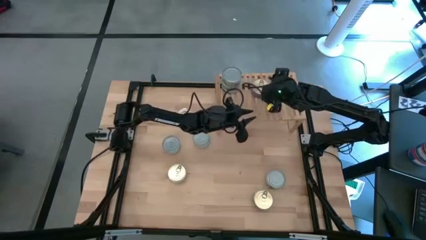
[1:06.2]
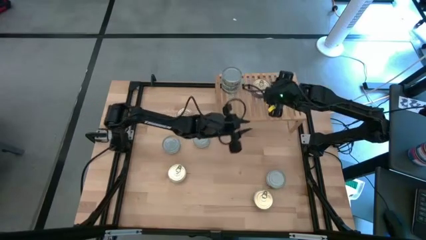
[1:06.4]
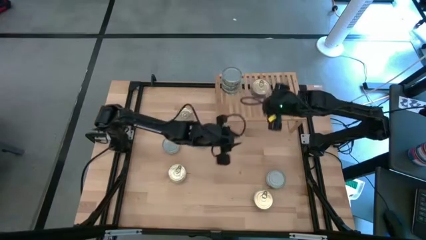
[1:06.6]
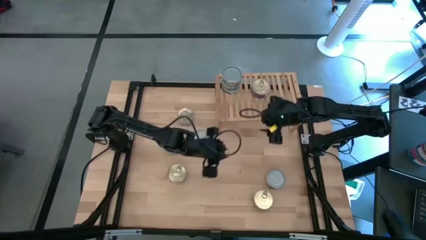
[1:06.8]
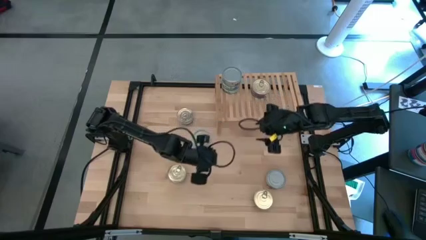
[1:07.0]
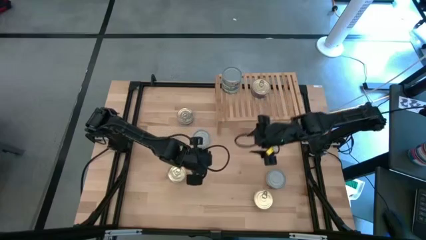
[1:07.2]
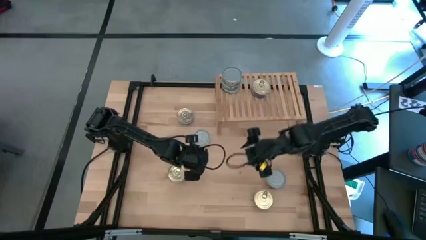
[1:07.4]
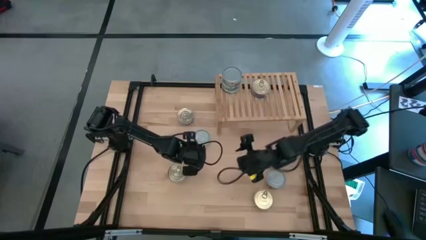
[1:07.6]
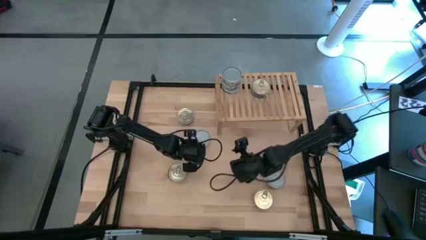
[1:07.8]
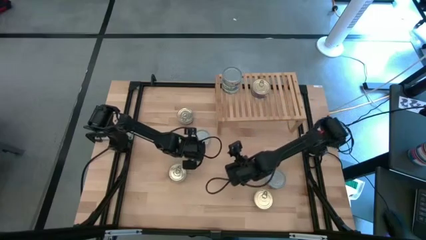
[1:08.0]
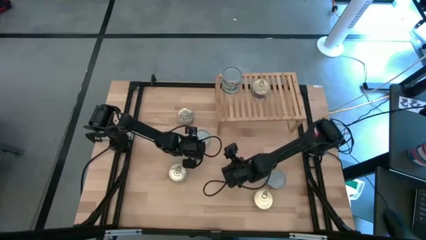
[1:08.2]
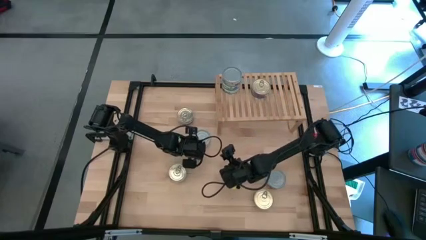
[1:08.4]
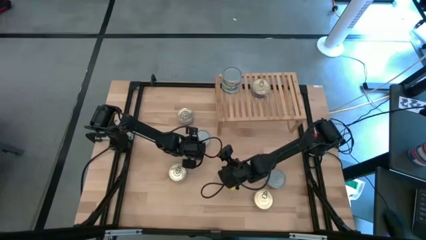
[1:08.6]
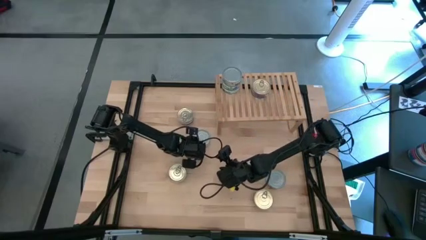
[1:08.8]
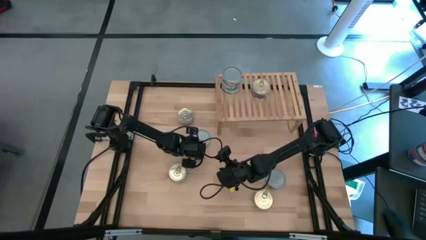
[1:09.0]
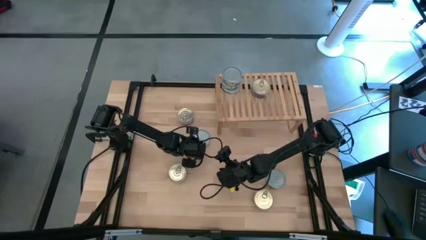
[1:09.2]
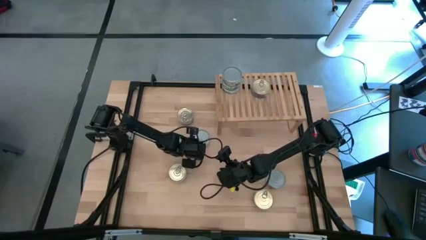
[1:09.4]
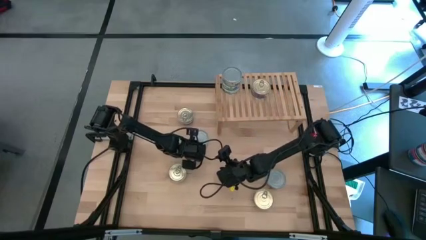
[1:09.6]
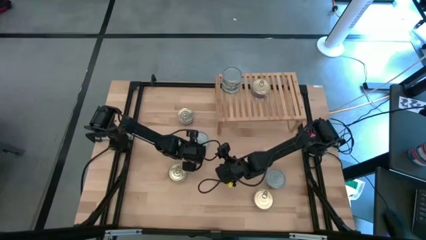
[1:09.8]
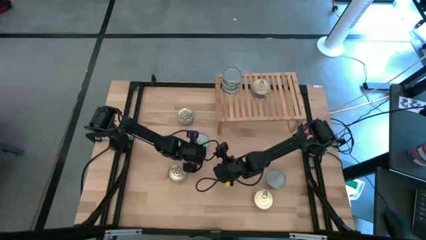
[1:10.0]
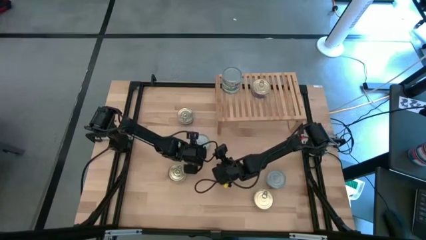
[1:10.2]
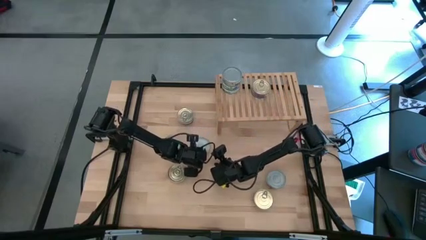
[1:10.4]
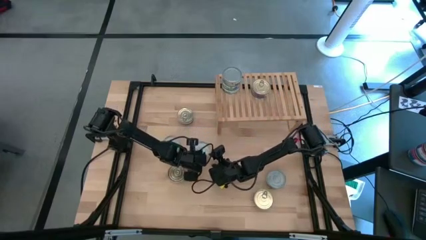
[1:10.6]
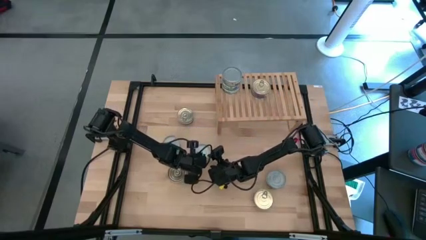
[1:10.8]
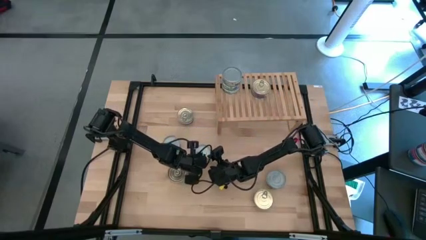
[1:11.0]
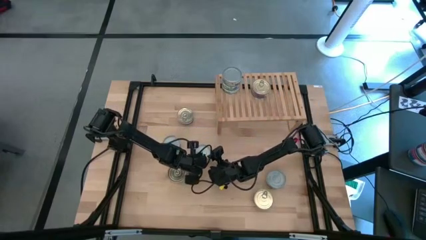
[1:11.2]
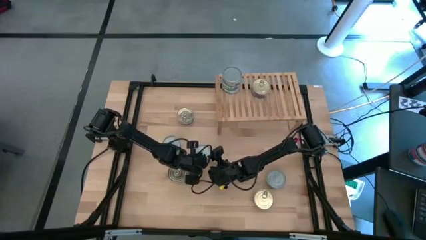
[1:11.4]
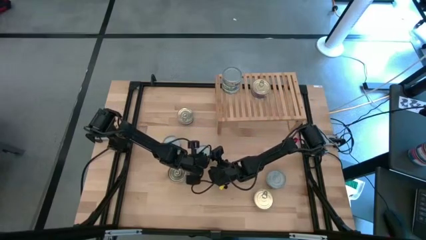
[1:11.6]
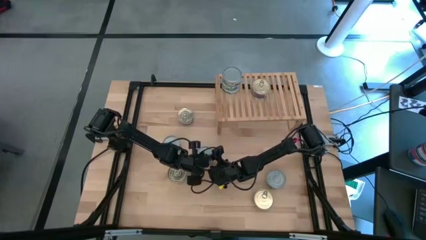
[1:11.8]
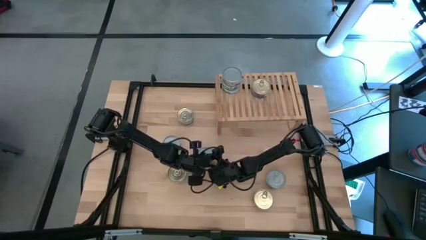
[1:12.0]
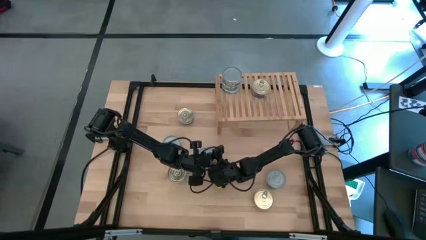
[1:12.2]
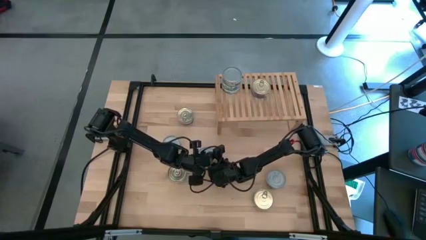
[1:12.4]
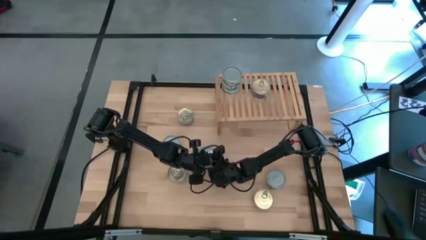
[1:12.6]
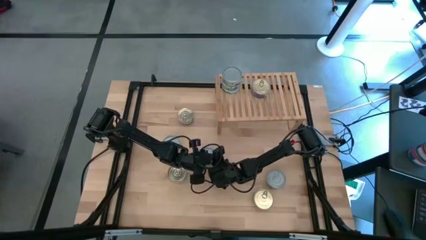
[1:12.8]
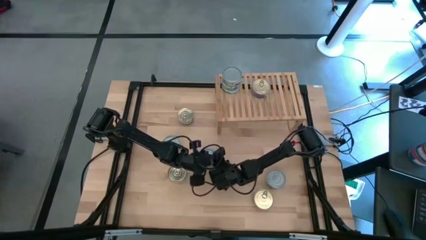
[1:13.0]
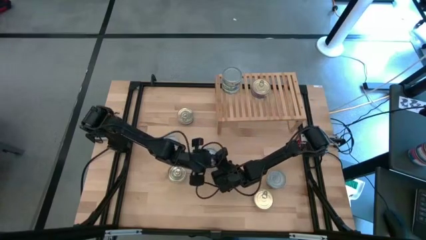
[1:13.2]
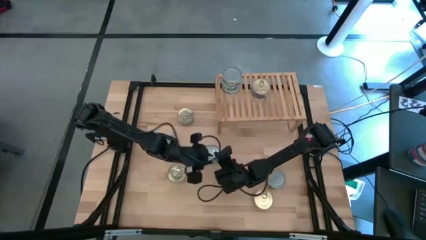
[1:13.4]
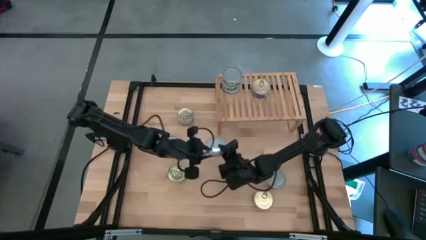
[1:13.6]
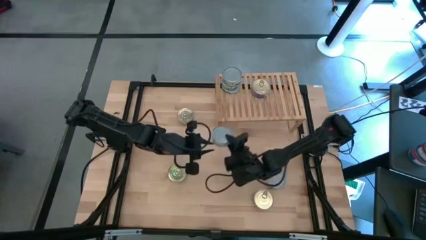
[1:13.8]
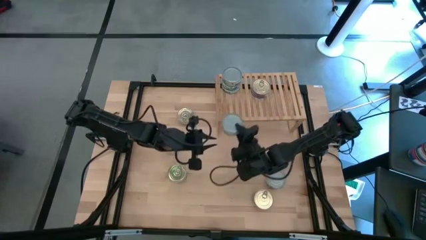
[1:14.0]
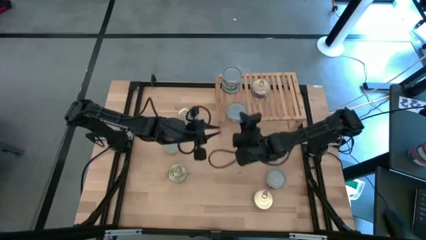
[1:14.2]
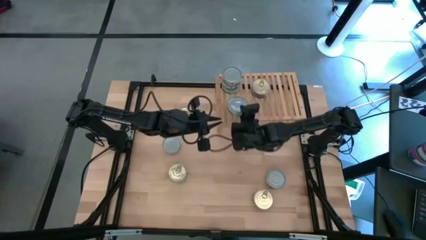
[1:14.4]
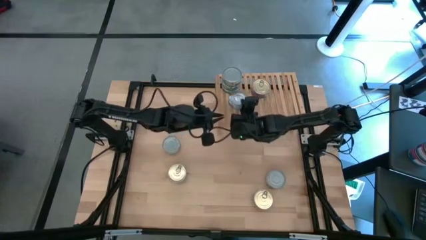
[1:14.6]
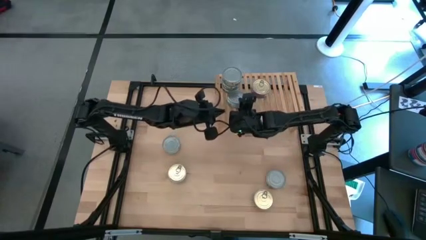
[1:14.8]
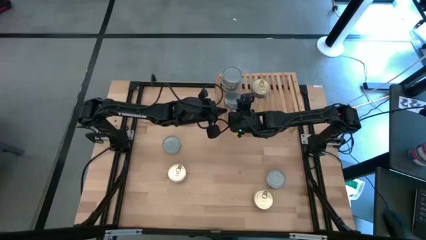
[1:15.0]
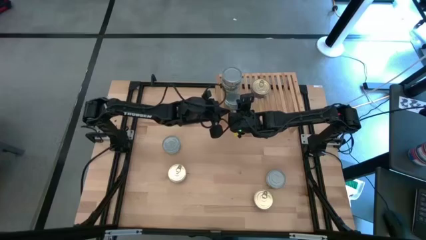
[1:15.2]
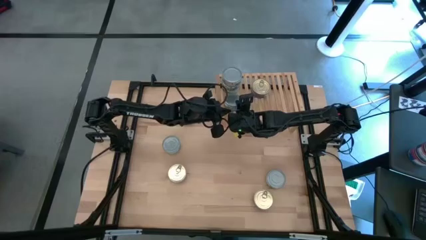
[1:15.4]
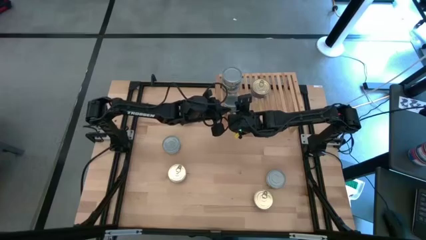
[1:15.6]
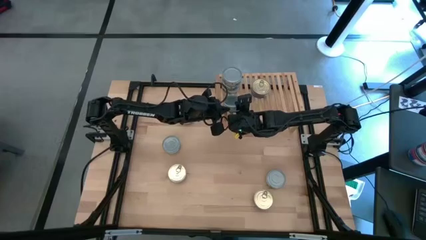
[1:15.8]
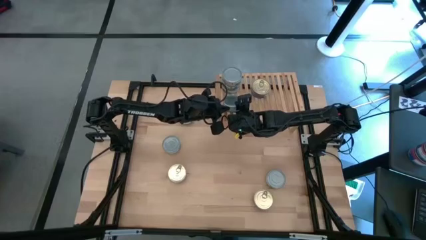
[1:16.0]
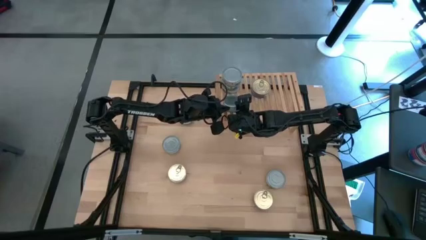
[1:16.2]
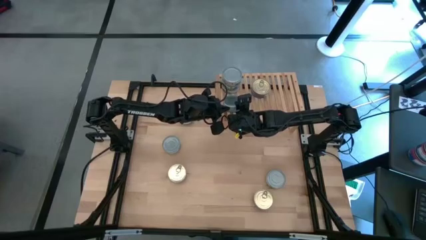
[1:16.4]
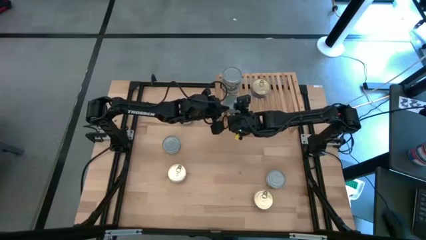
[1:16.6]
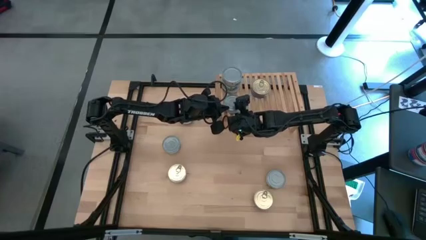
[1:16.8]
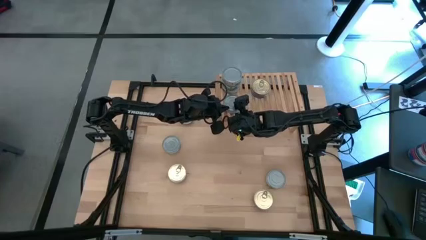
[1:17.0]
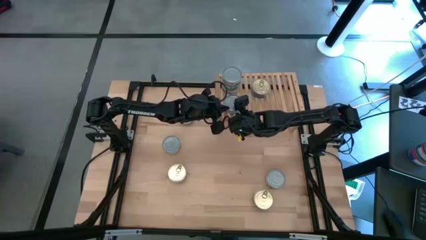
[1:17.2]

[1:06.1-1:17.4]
Task: Stack canned seafood by type on shelf
Put the green tuna can on the shelf
